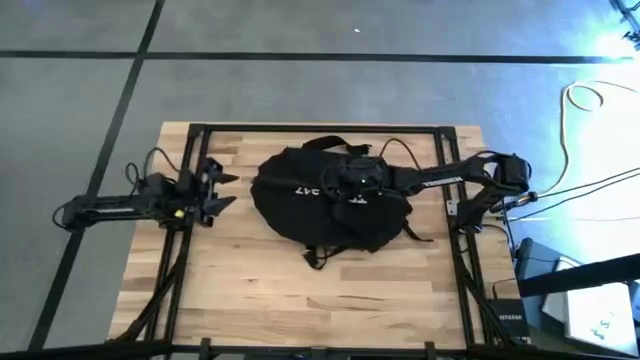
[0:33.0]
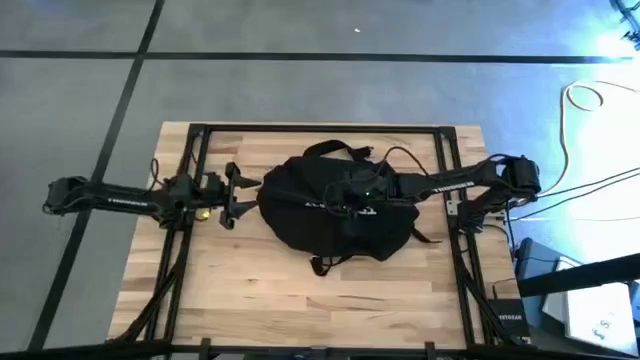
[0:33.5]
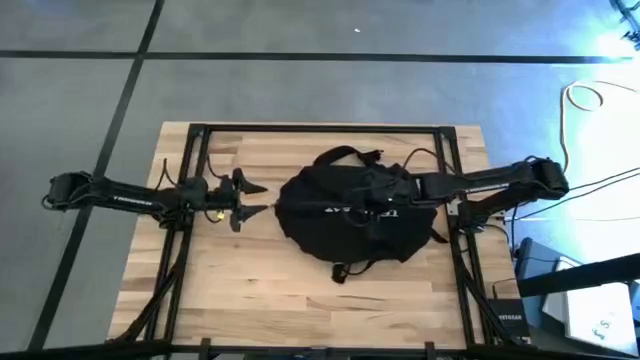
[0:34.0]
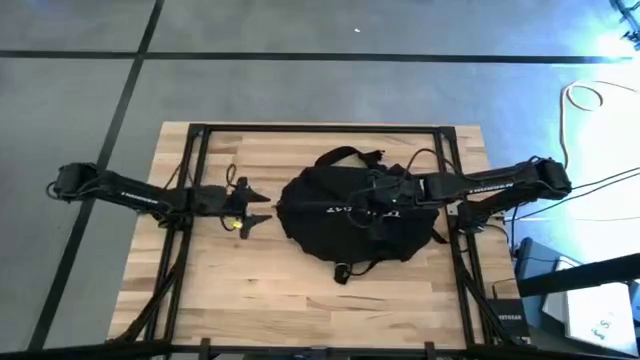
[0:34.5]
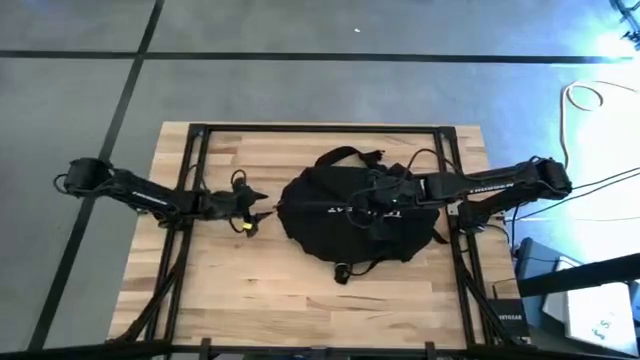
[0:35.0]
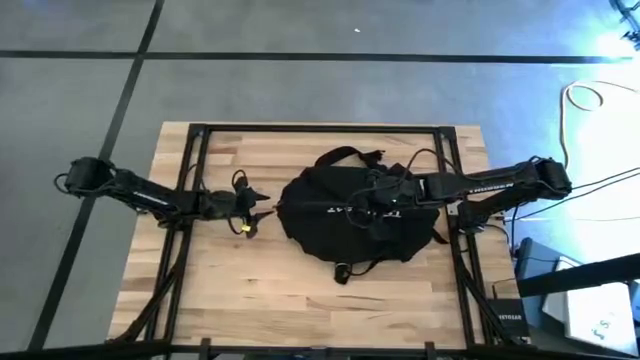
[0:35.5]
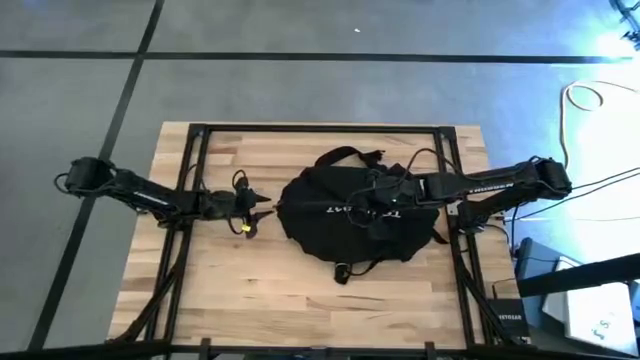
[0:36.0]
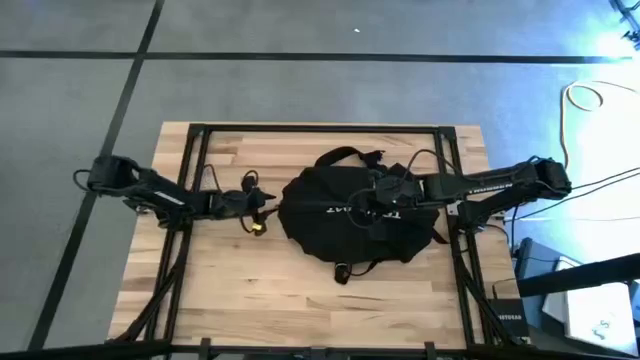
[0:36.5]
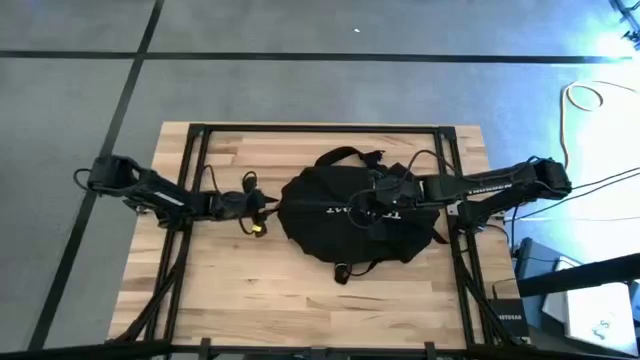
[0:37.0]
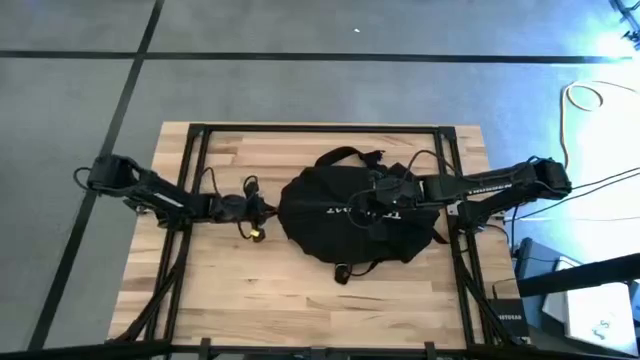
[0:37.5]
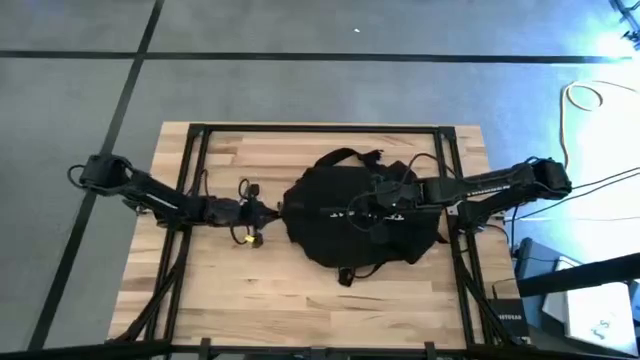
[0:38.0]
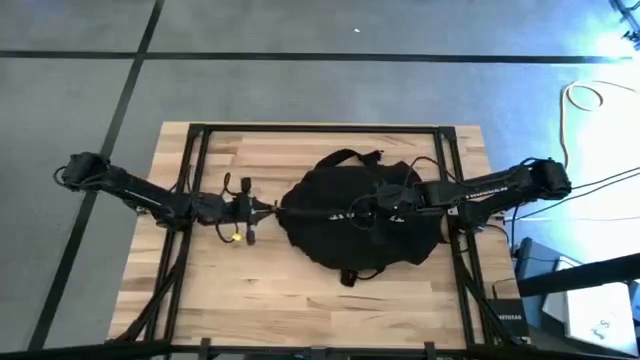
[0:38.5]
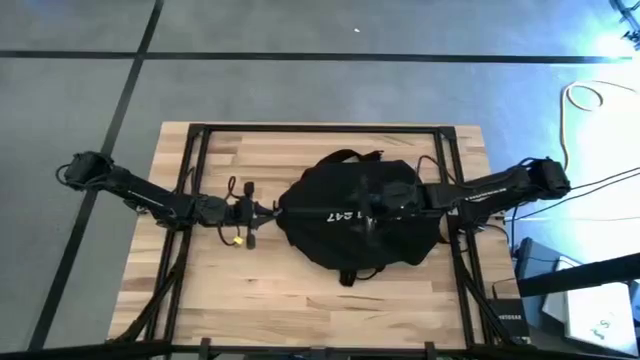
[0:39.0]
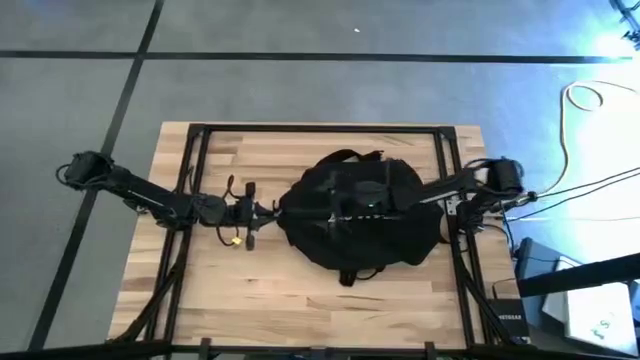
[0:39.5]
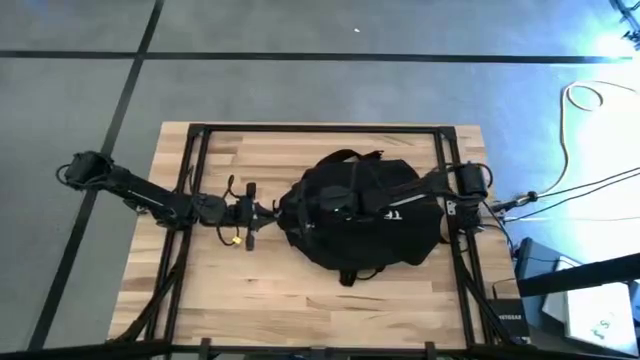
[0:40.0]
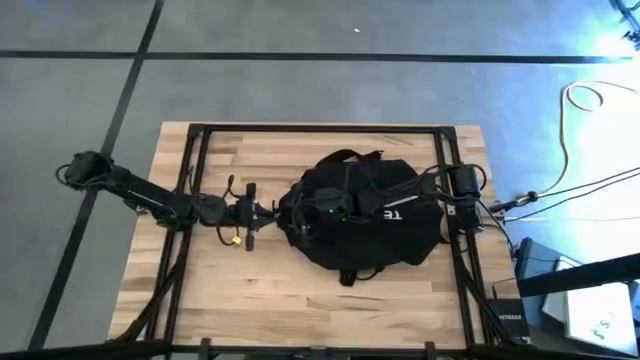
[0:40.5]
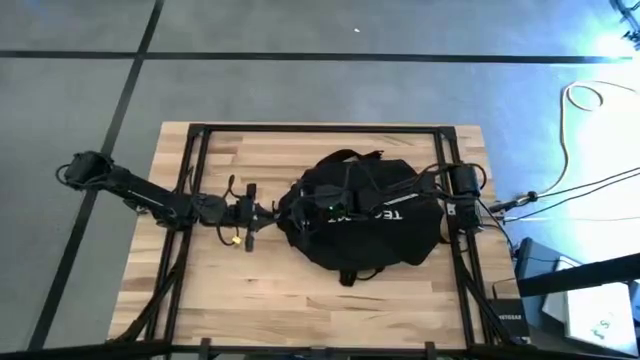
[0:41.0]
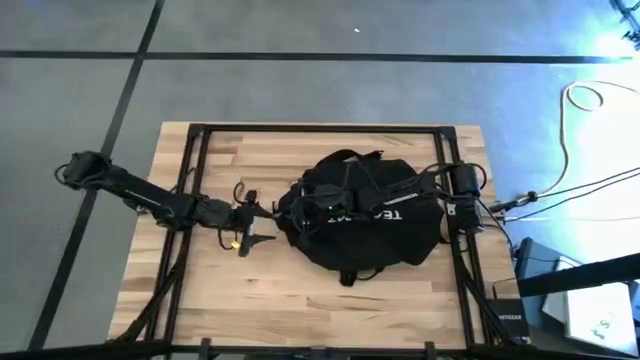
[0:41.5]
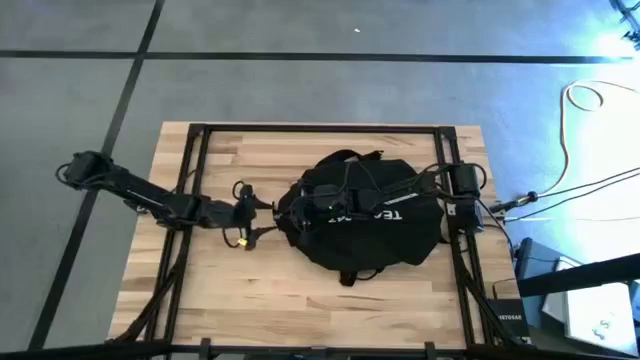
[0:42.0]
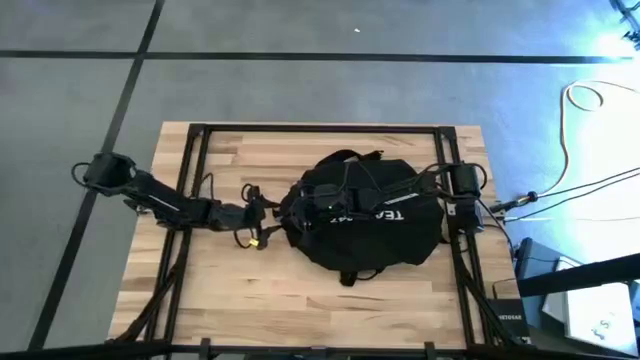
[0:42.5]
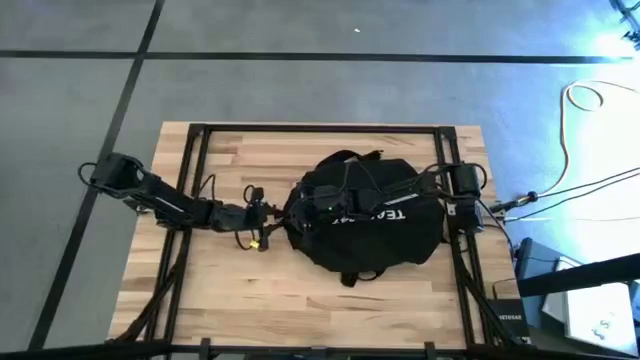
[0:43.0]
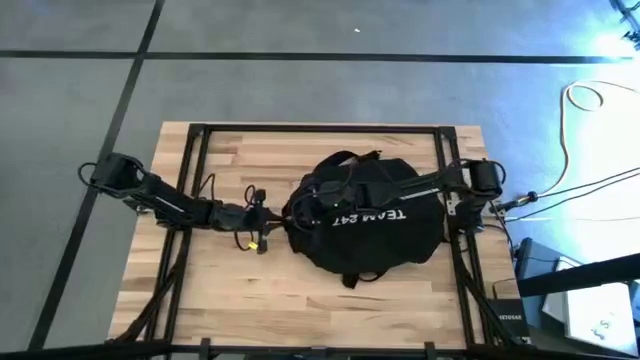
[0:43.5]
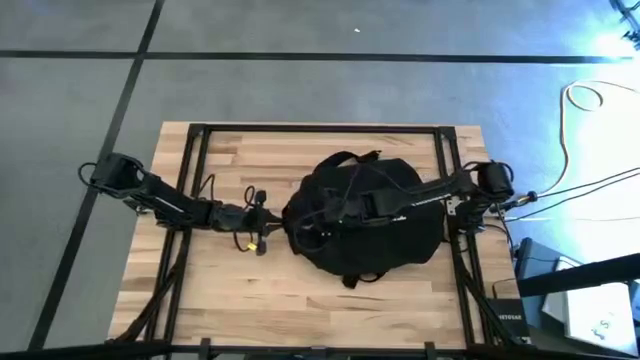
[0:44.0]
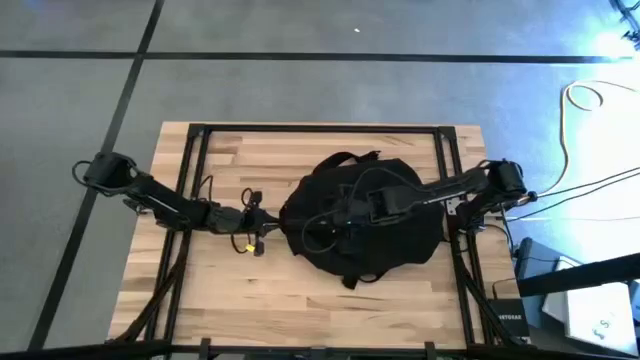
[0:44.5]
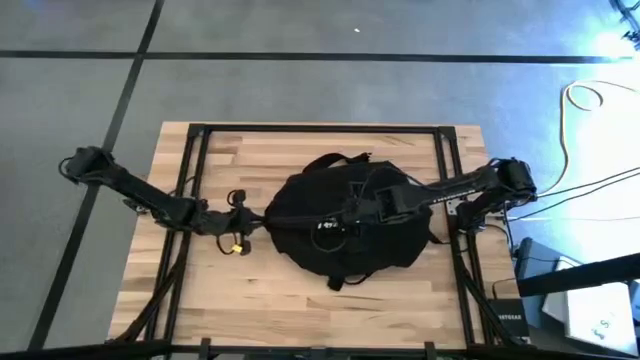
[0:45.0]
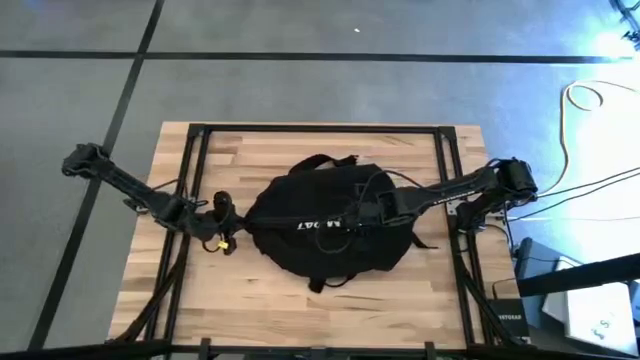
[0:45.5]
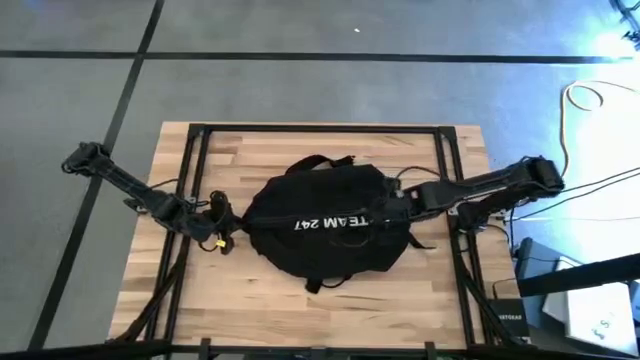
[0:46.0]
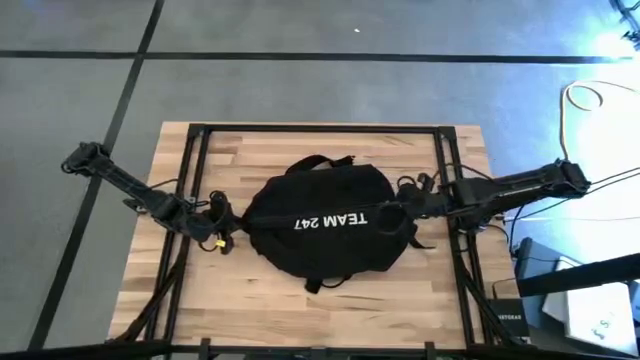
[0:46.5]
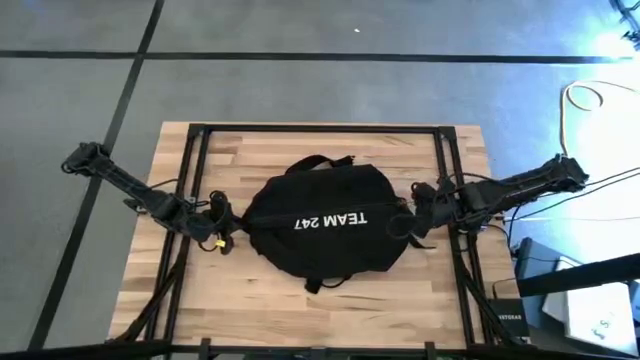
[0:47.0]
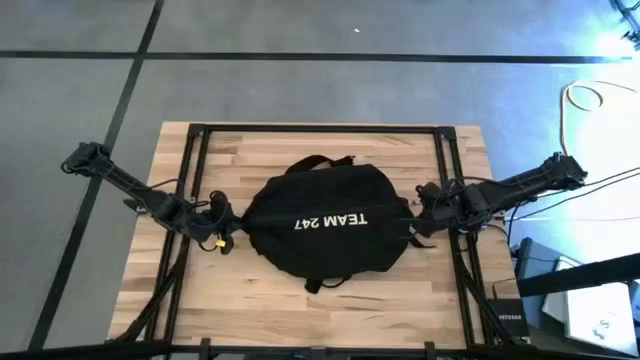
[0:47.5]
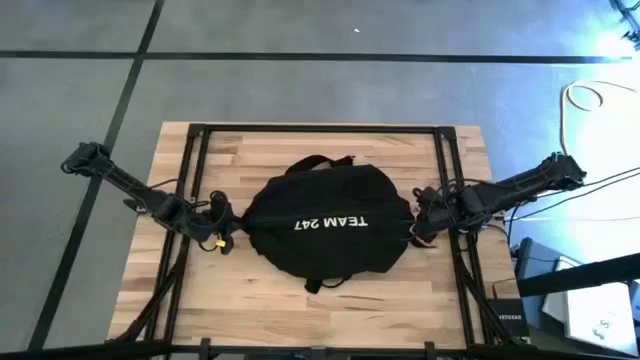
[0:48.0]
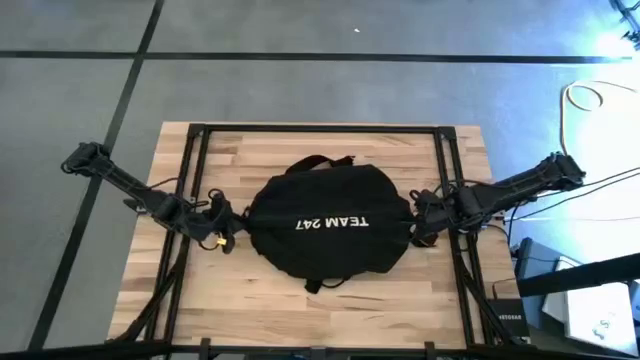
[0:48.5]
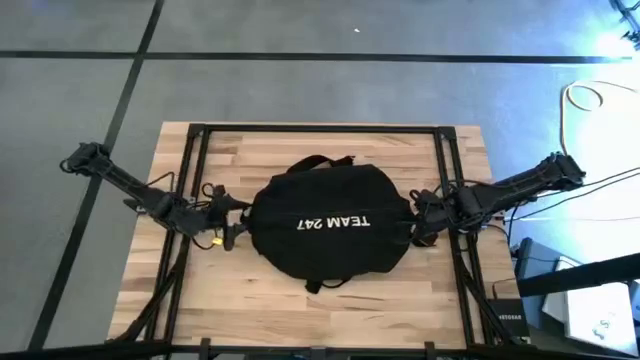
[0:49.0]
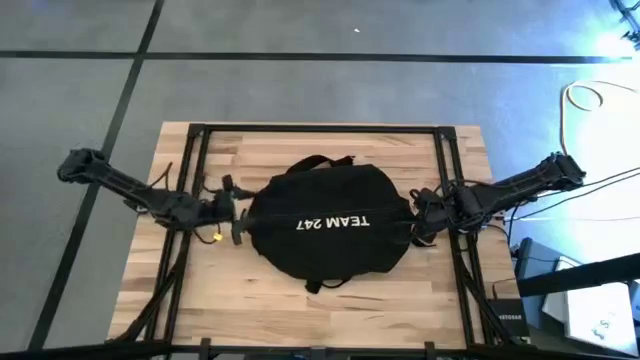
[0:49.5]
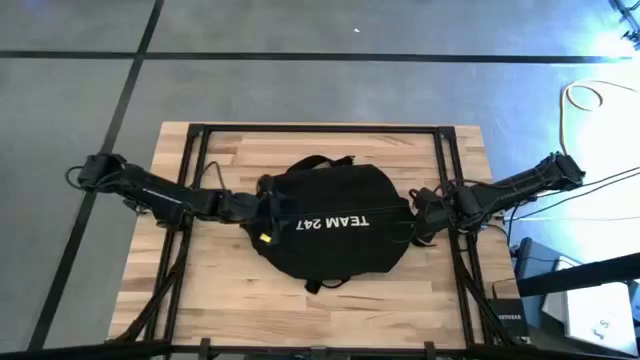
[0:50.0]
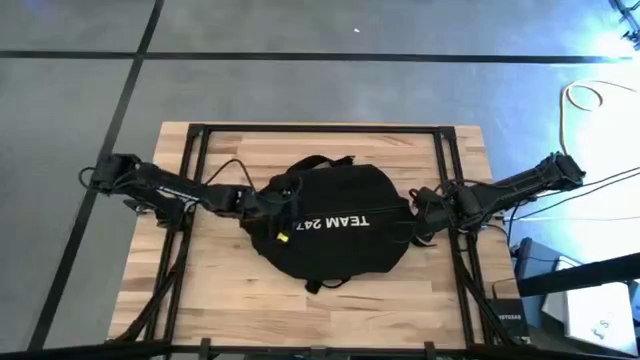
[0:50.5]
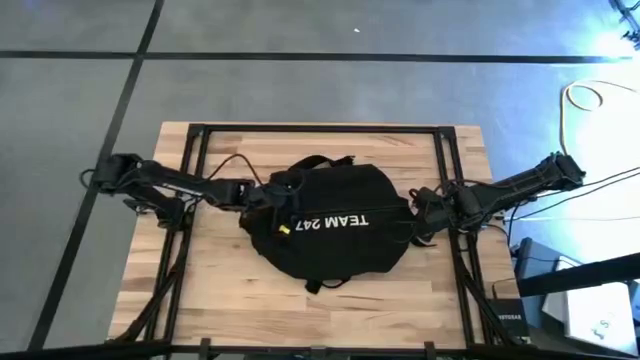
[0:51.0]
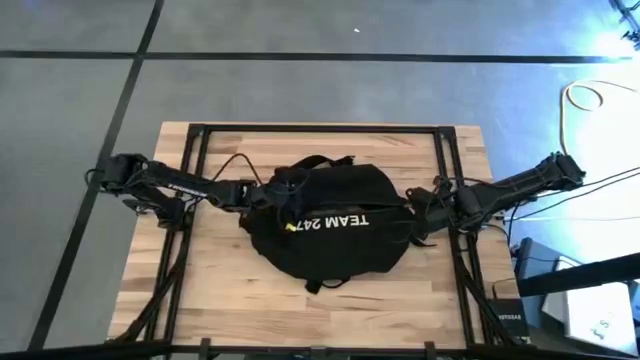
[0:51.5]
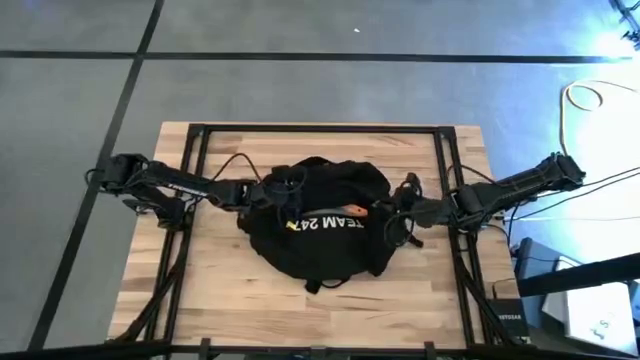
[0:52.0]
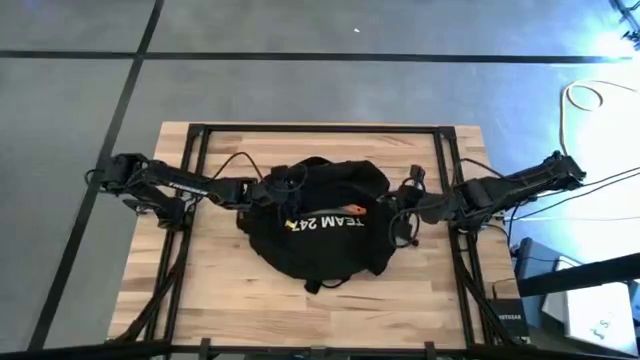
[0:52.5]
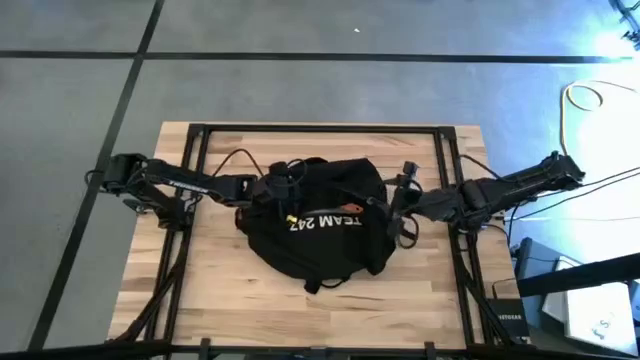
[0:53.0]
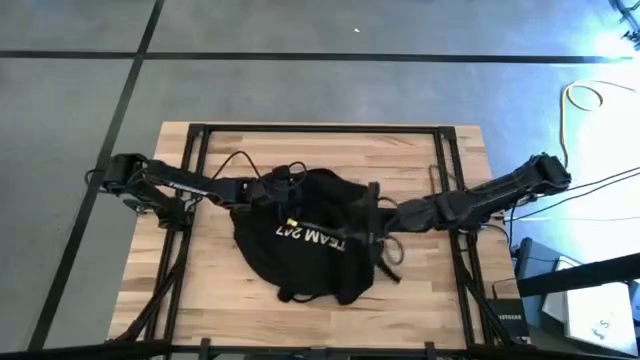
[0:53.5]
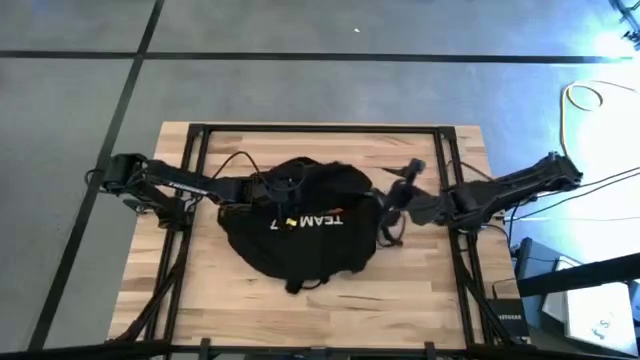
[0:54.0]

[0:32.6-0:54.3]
Task: Unpack backpack
Open the black backpack
